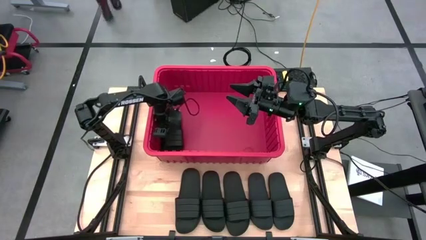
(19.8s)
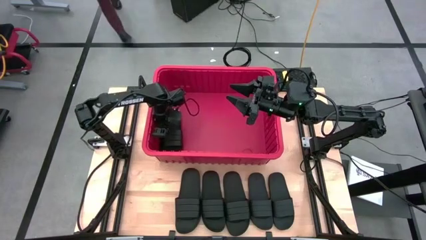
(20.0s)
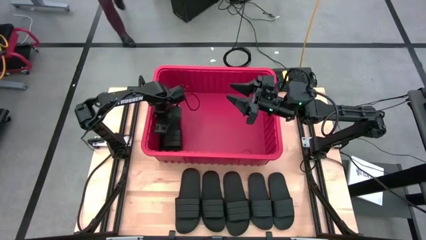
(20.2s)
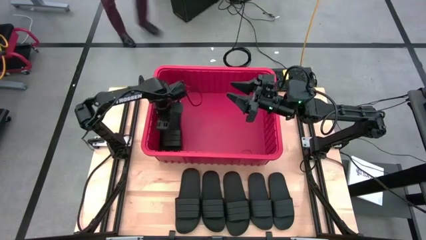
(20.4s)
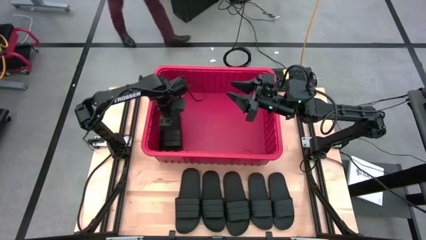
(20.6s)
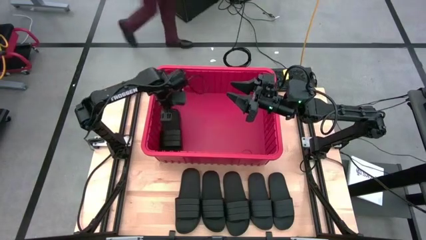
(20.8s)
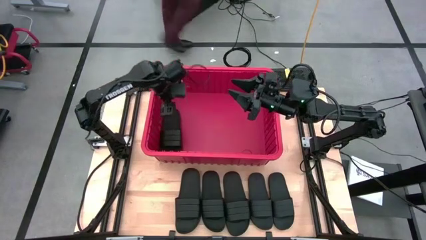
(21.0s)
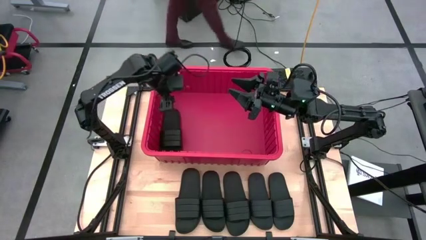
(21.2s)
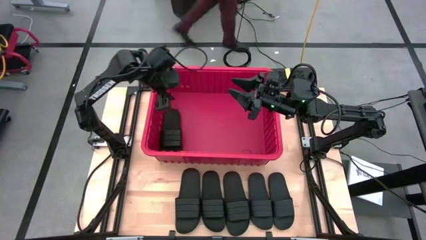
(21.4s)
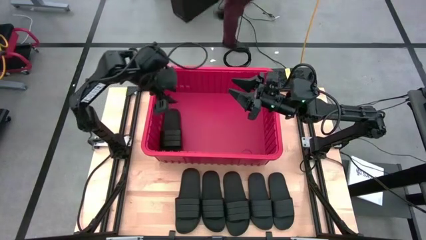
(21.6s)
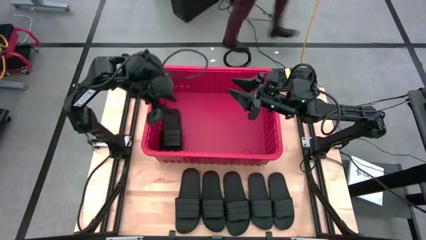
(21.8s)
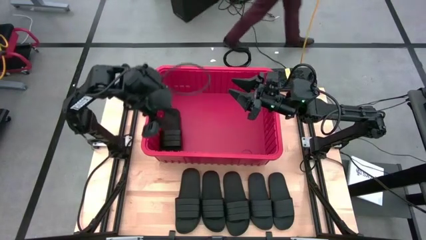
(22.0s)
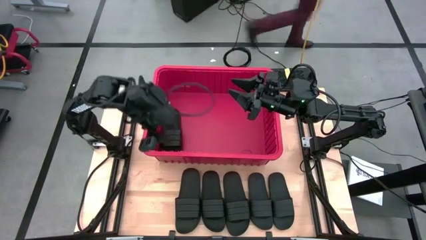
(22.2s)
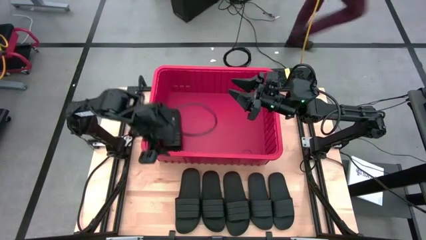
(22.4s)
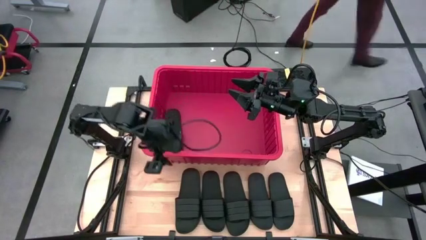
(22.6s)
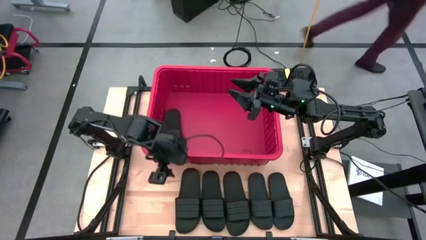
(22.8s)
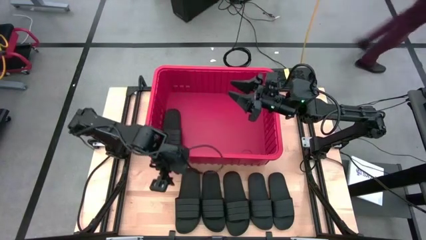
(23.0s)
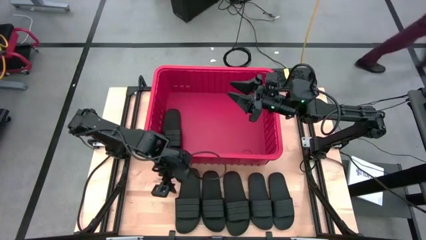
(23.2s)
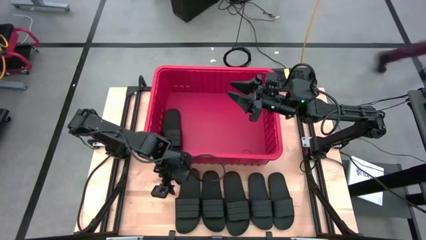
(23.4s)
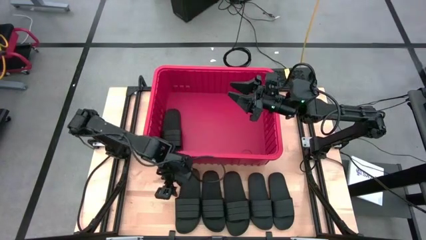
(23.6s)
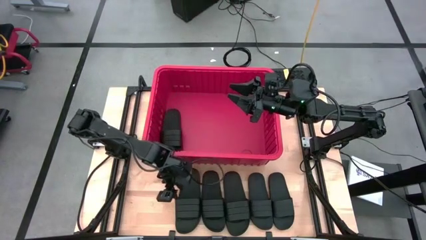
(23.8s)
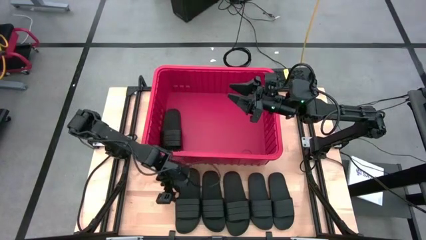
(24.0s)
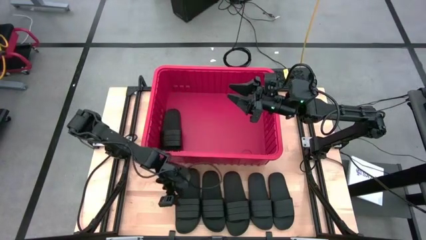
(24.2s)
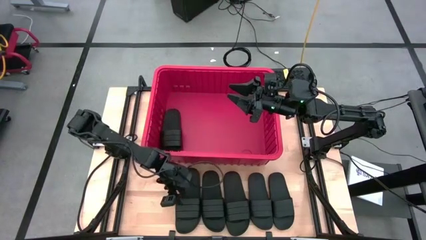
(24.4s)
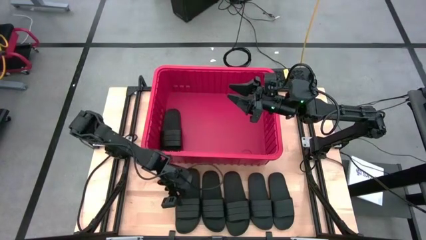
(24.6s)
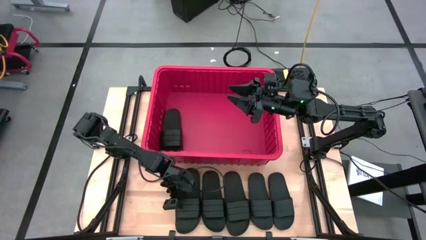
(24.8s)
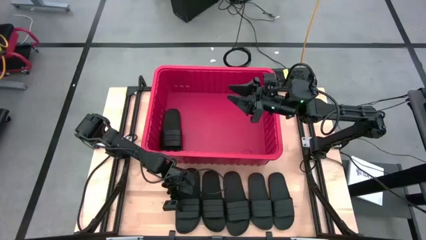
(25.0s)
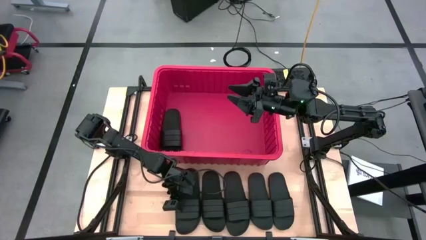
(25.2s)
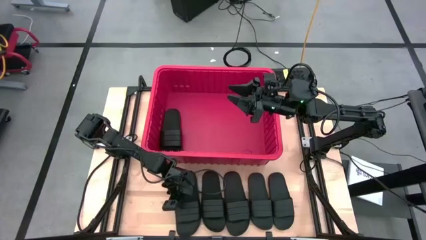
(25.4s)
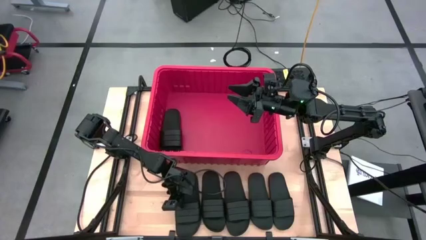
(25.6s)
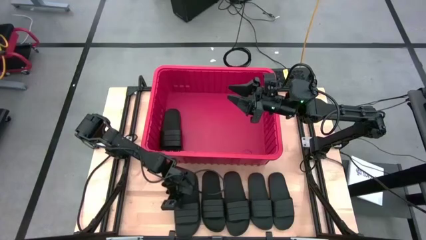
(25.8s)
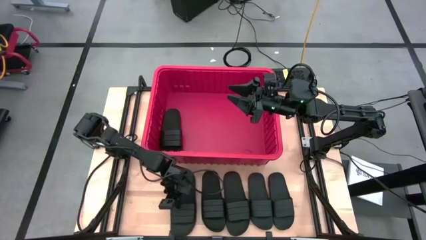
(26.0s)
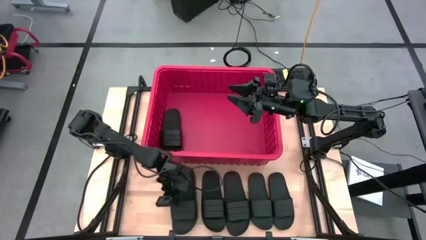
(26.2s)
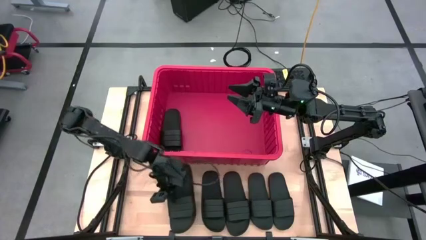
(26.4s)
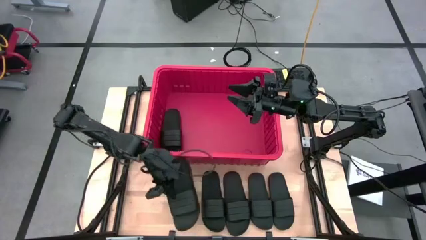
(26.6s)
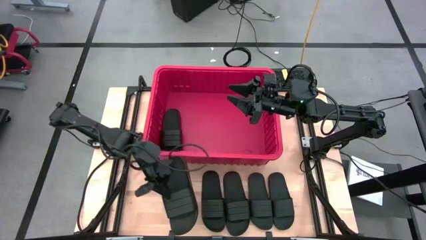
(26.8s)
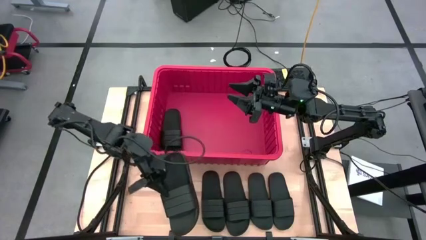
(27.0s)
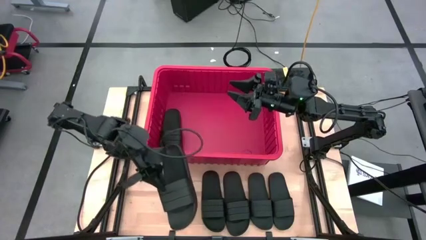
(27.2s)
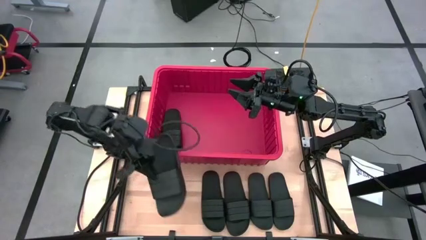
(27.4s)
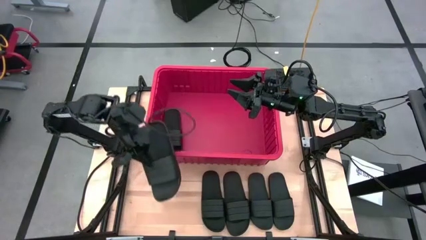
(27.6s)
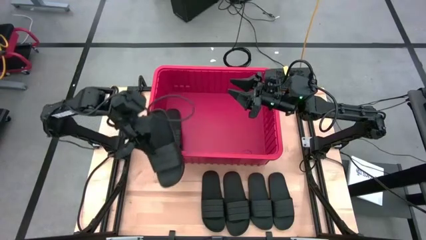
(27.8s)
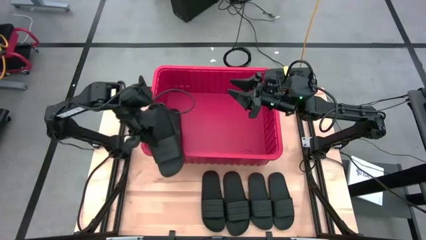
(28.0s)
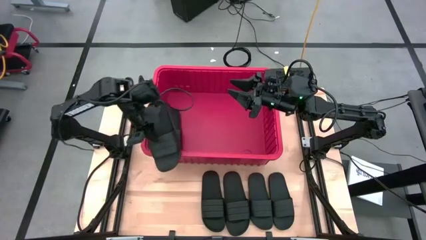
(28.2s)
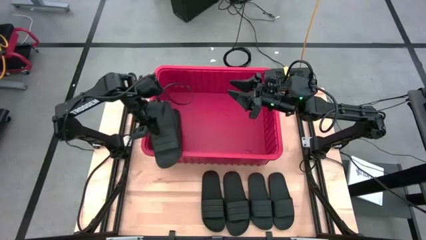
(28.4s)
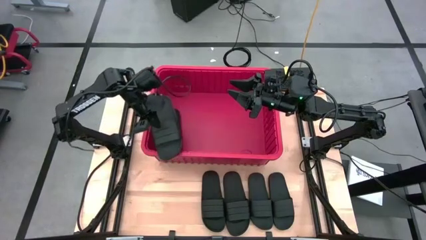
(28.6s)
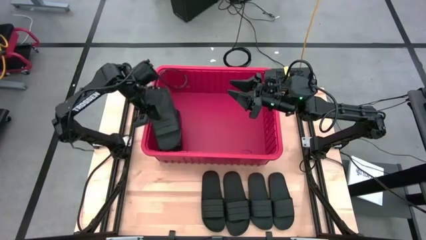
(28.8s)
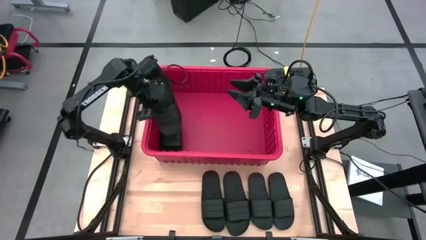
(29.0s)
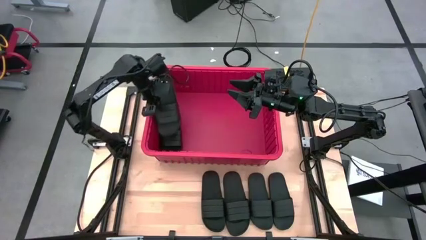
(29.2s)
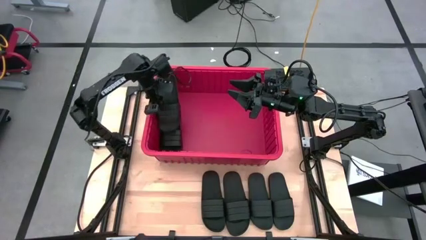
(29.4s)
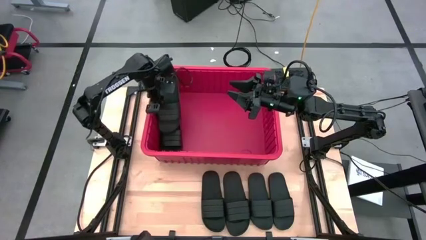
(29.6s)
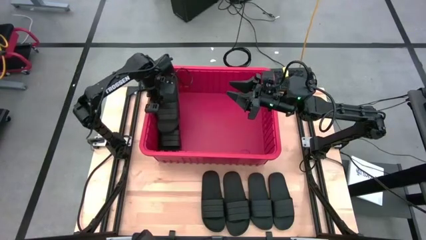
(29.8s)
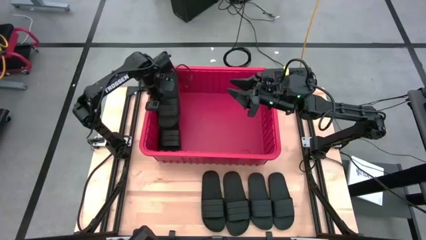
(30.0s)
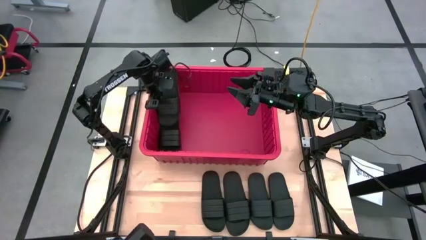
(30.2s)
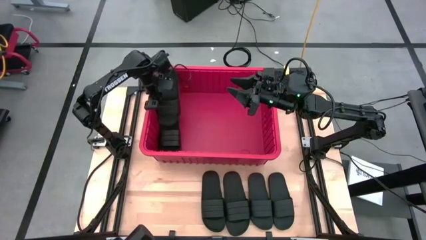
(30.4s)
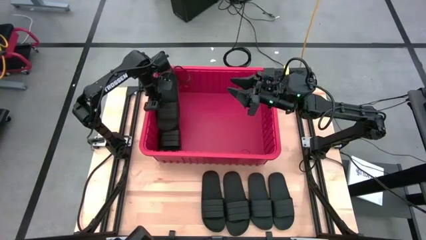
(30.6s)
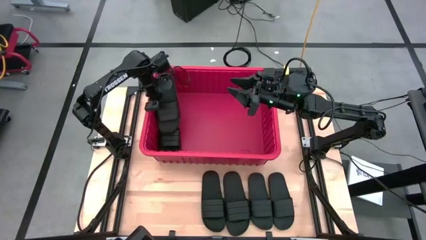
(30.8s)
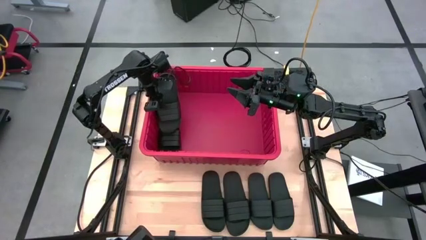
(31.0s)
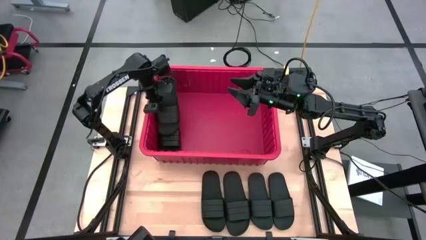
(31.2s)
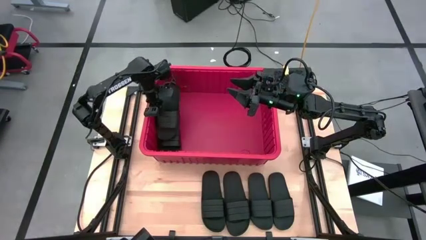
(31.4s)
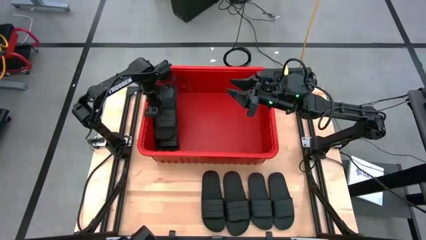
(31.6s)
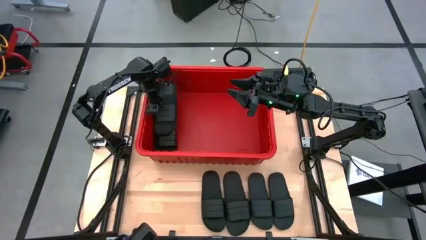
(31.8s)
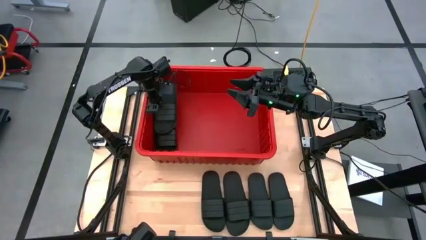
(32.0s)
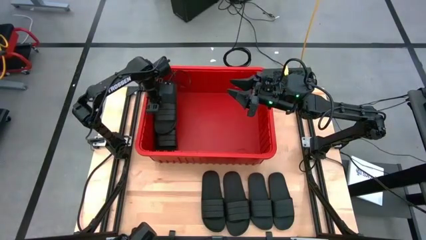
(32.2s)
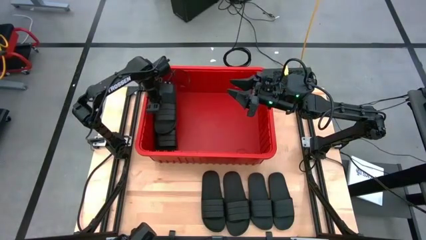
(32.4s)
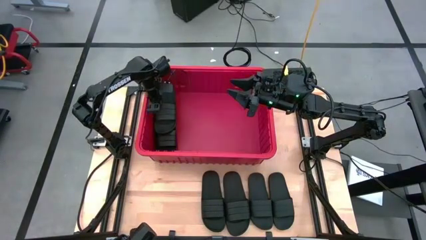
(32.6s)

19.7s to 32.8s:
Task: Pick and place slides into bin
Put the black slide into the red bin
